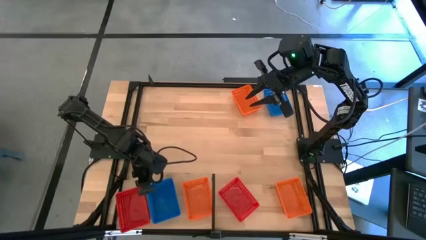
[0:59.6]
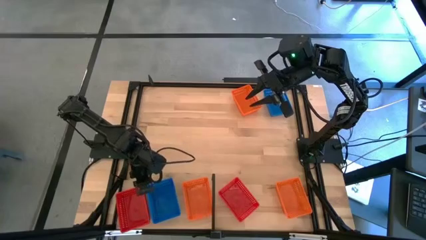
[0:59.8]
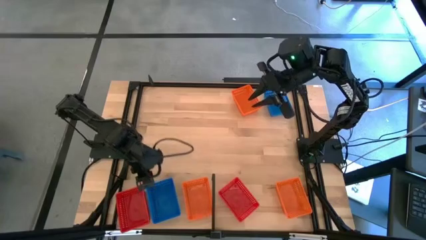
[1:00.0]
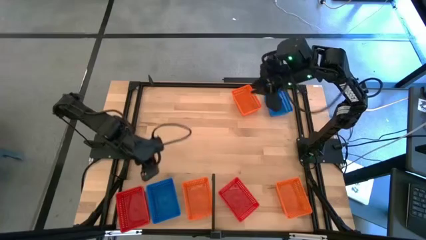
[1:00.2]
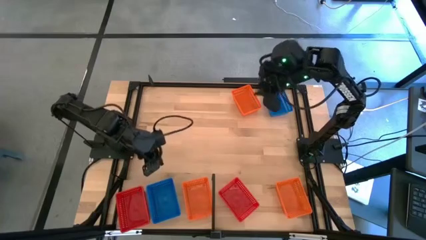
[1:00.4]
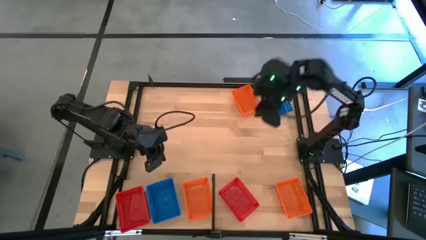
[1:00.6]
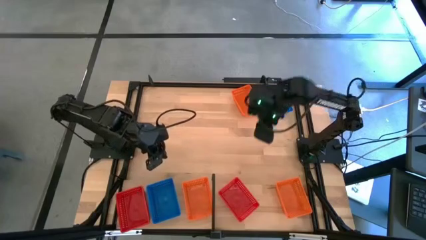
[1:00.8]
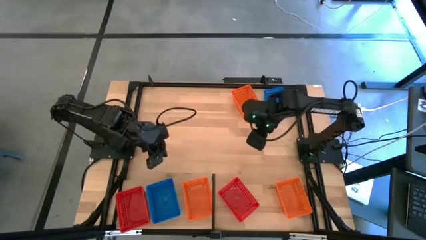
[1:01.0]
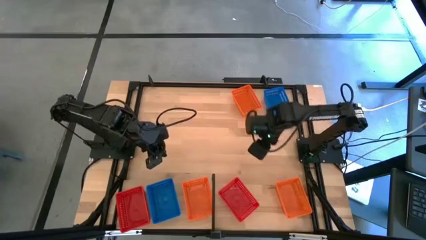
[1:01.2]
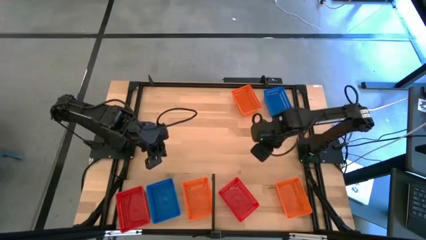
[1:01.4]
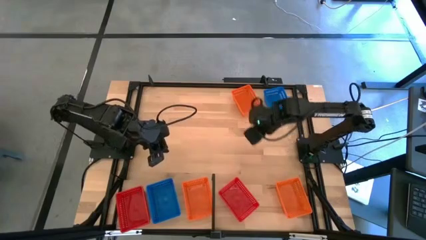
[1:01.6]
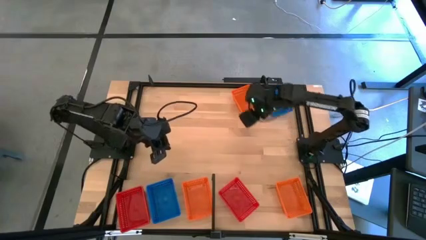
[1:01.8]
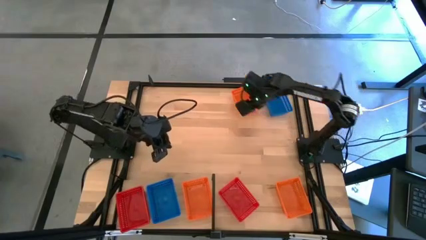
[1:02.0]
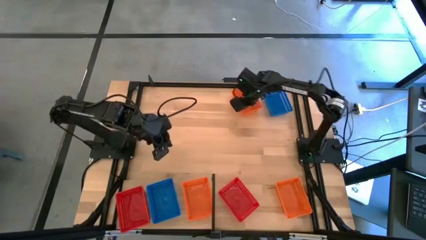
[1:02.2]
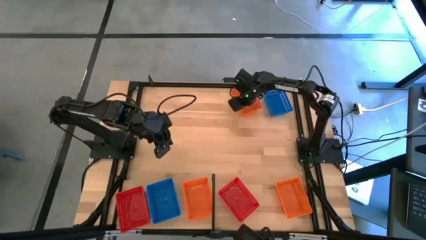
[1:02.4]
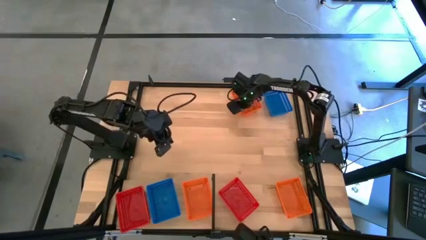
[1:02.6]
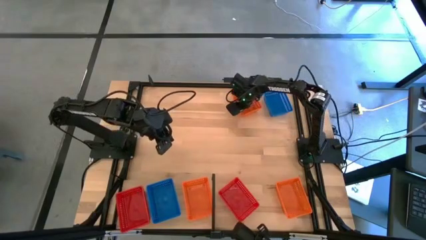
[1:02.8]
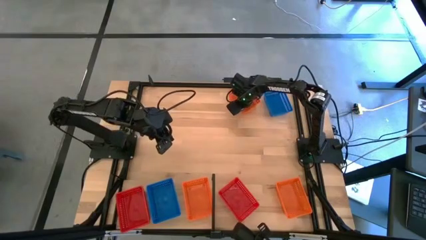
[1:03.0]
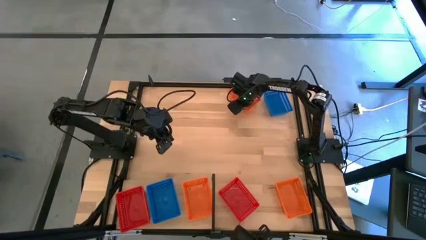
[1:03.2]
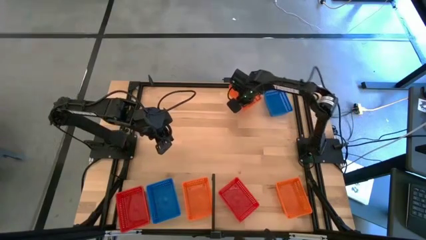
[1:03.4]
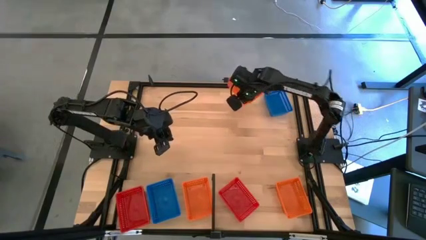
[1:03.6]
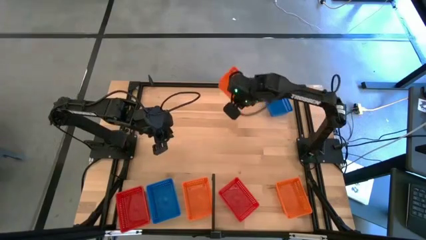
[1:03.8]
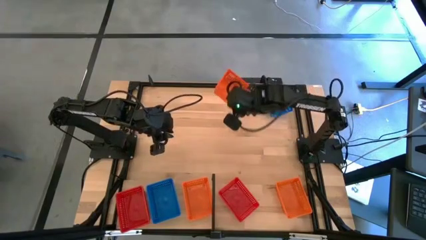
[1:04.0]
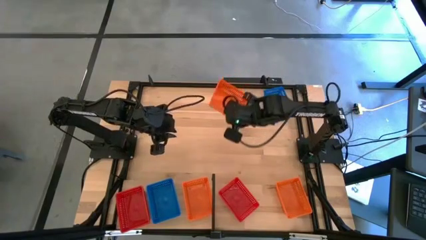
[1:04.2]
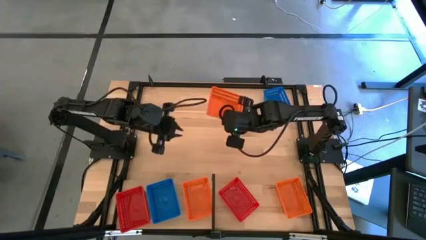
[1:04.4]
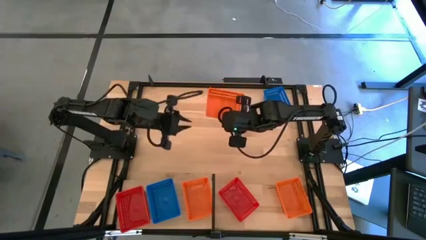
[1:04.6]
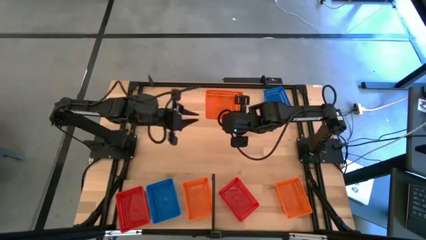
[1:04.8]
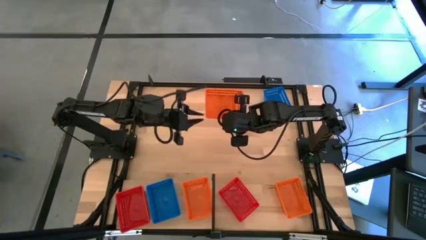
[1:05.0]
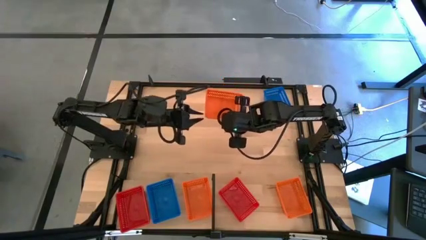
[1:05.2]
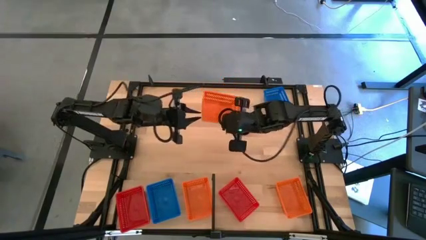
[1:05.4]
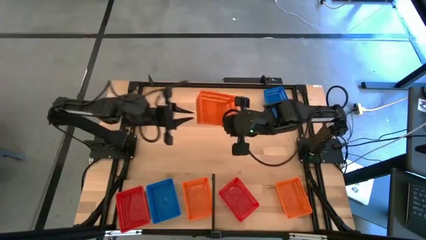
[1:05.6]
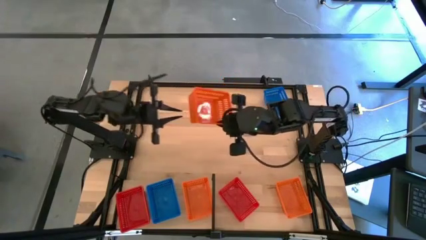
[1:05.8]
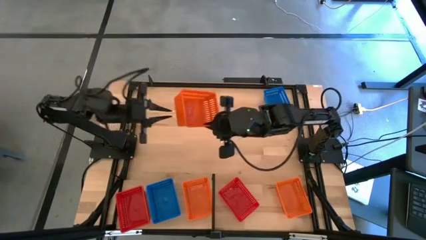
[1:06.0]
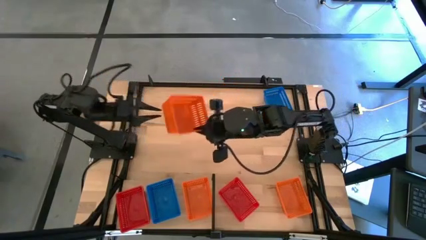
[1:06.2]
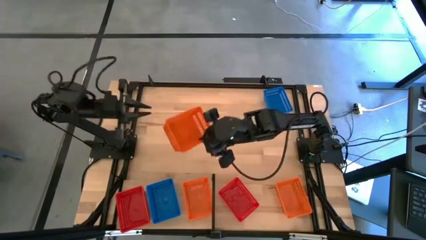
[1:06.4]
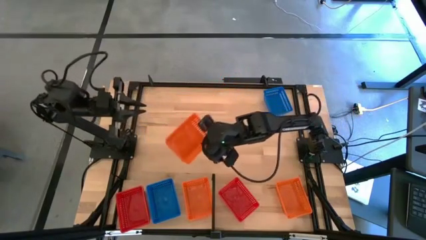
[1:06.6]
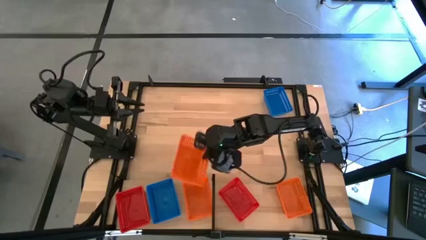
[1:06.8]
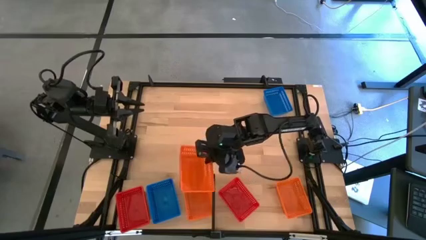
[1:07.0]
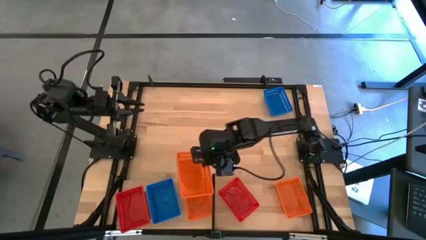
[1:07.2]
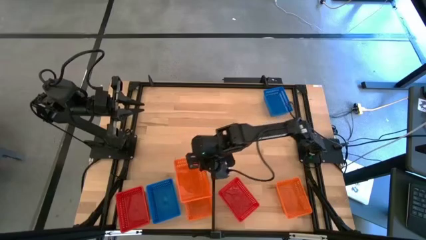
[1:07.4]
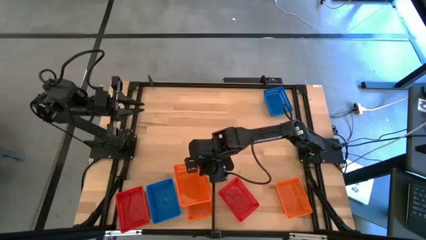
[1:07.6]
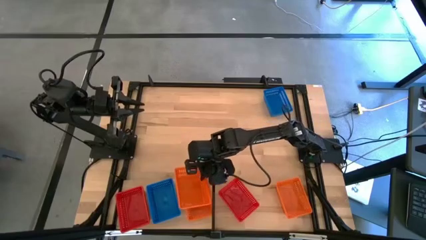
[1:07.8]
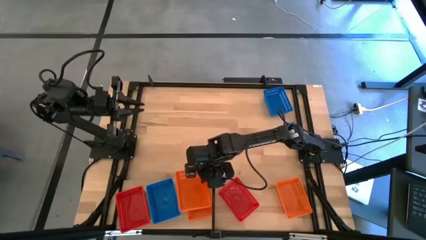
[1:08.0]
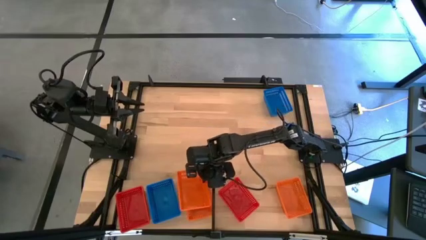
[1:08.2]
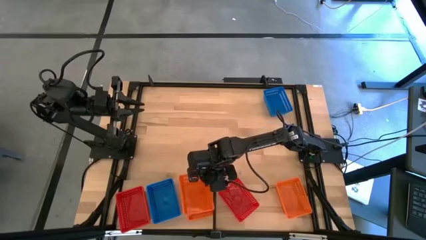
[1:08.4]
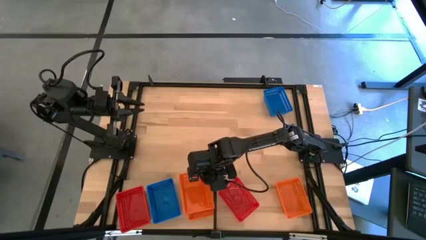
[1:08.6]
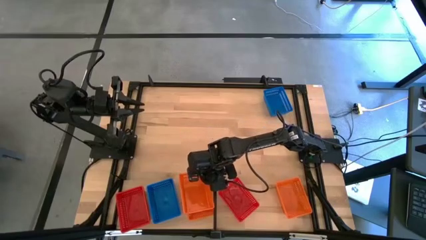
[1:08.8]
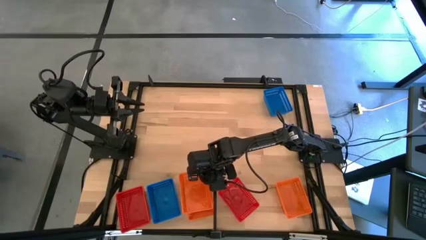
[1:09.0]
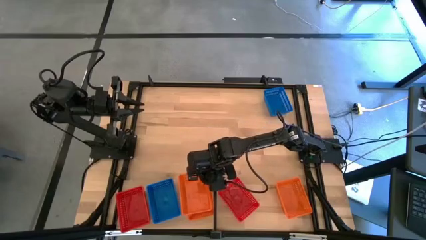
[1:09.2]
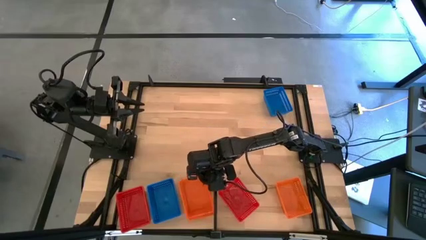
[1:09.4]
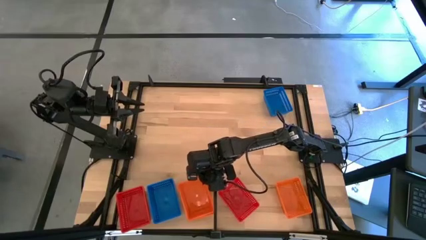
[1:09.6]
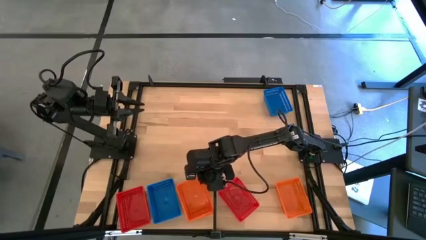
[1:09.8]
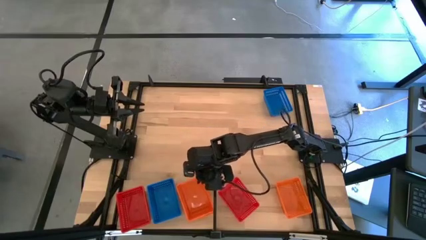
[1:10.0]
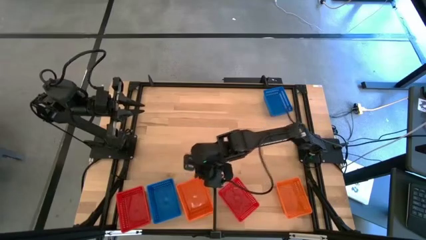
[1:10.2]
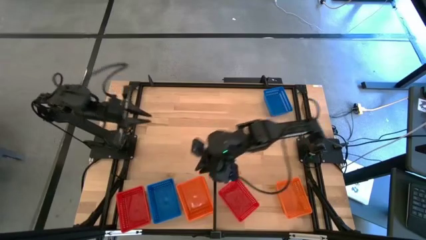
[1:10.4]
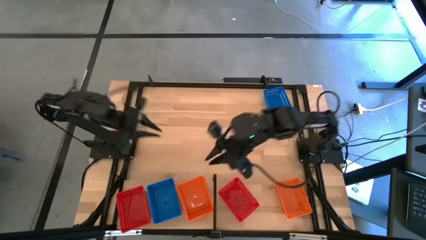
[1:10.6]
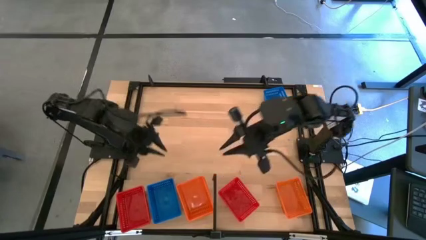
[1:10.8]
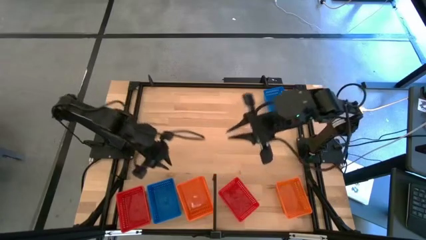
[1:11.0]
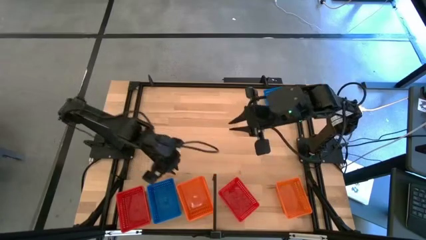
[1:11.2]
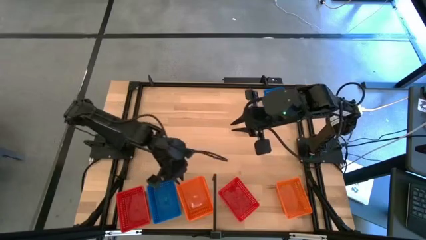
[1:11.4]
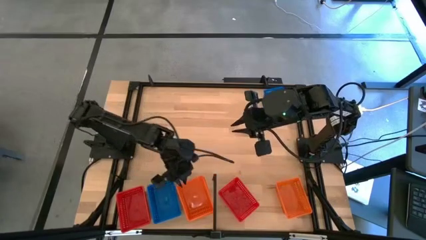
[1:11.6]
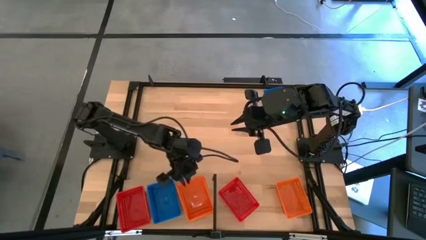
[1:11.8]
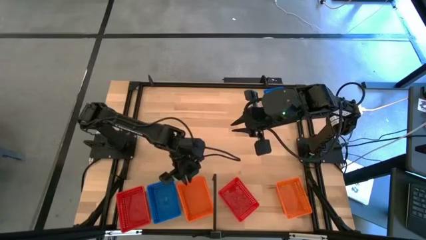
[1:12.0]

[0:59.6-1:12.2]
Task: Stack baskets on shelf by color
Stack the top orange bin on top of the orange bin on the shelf
